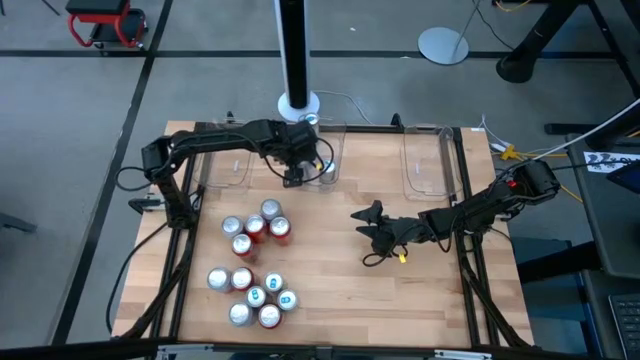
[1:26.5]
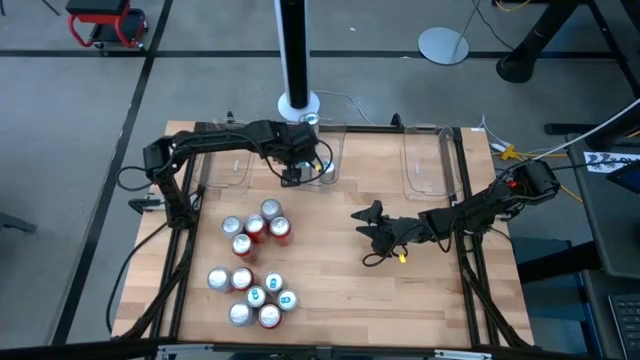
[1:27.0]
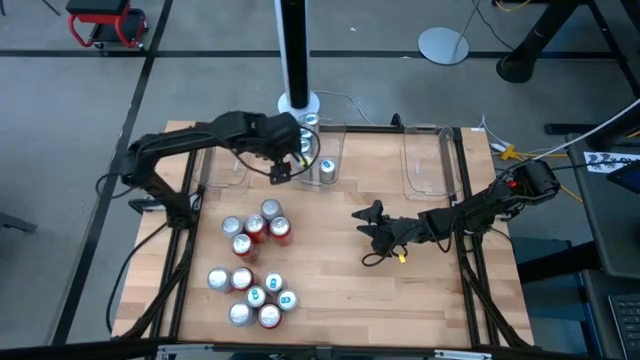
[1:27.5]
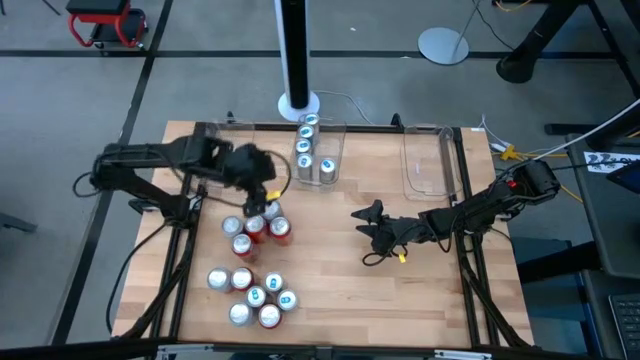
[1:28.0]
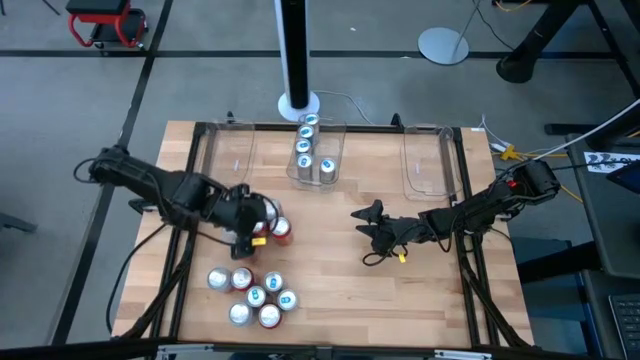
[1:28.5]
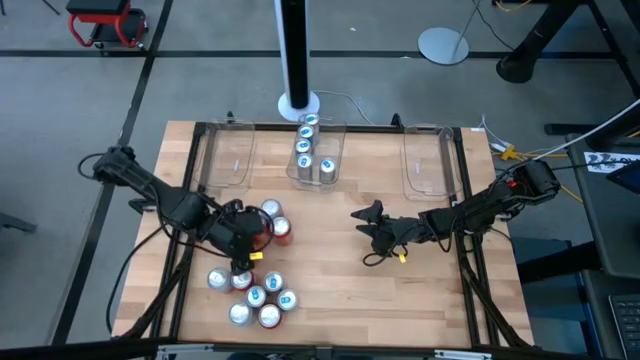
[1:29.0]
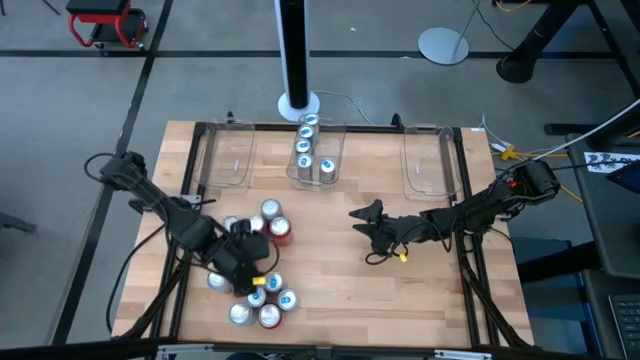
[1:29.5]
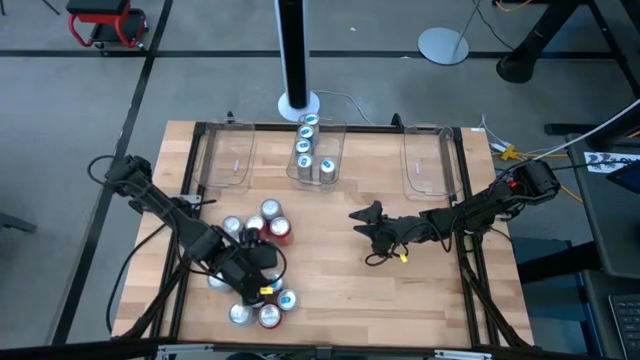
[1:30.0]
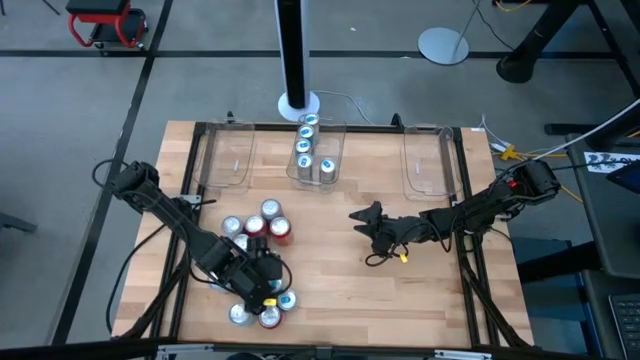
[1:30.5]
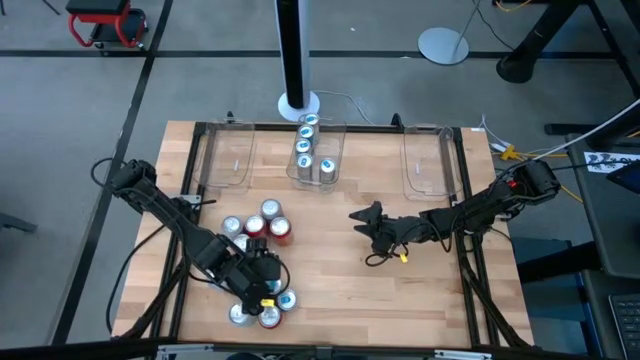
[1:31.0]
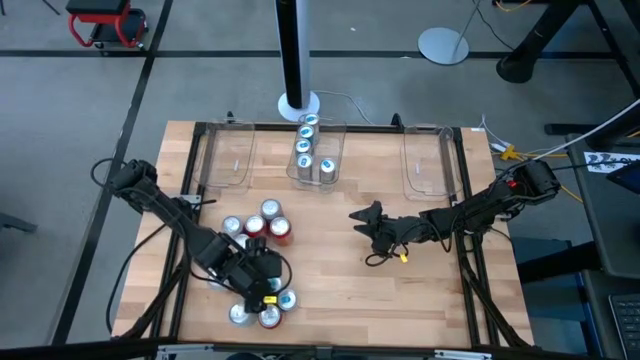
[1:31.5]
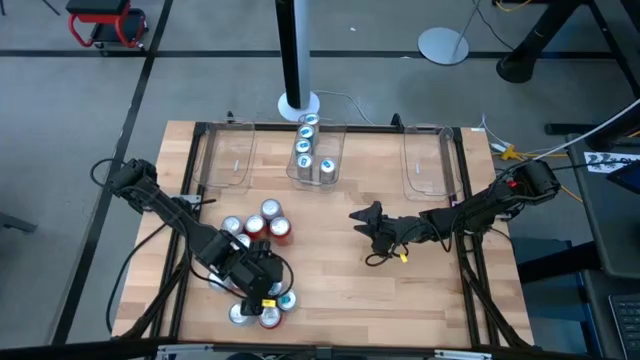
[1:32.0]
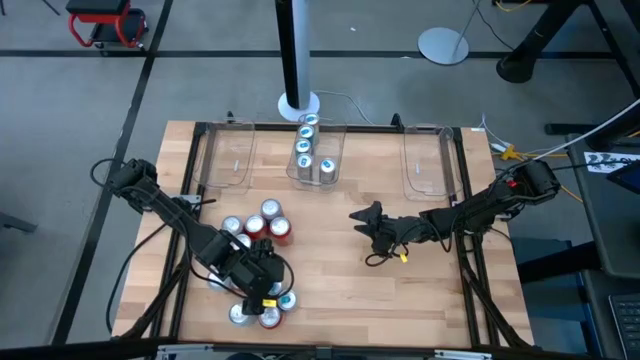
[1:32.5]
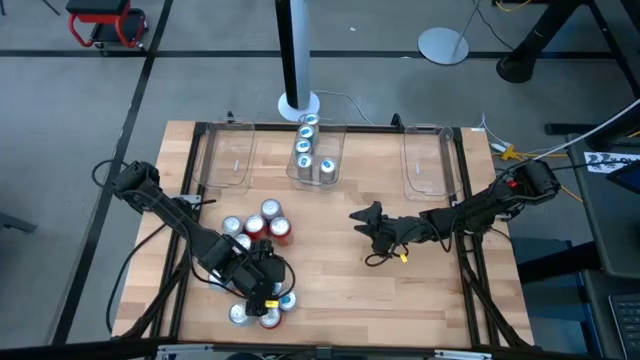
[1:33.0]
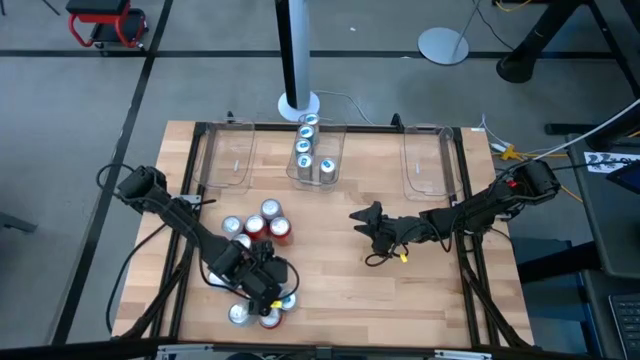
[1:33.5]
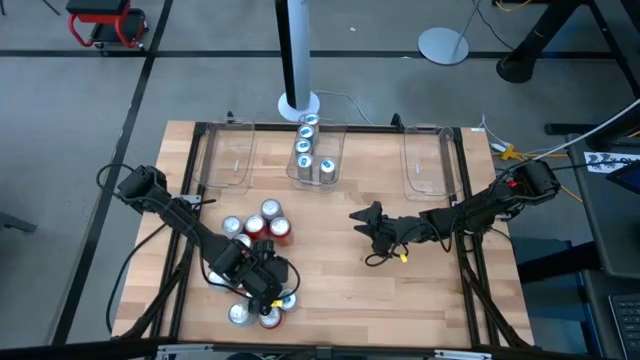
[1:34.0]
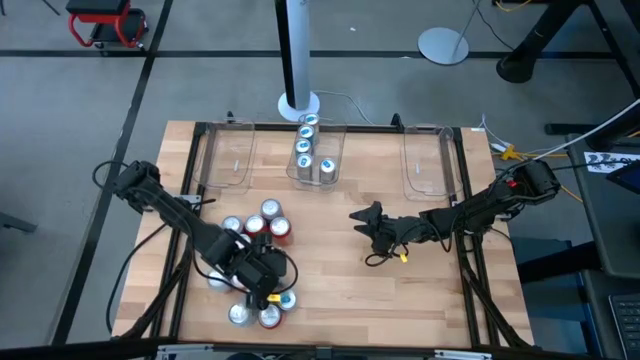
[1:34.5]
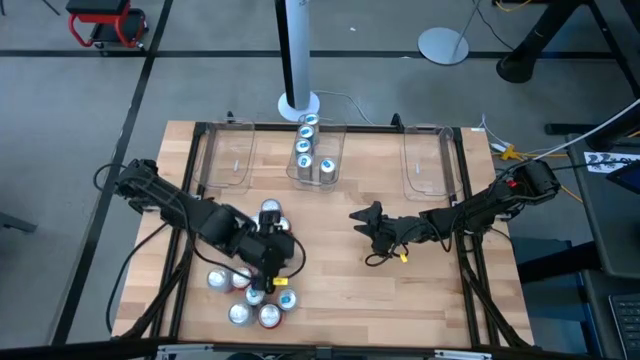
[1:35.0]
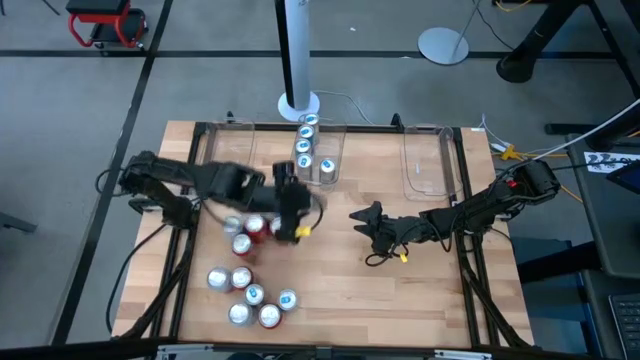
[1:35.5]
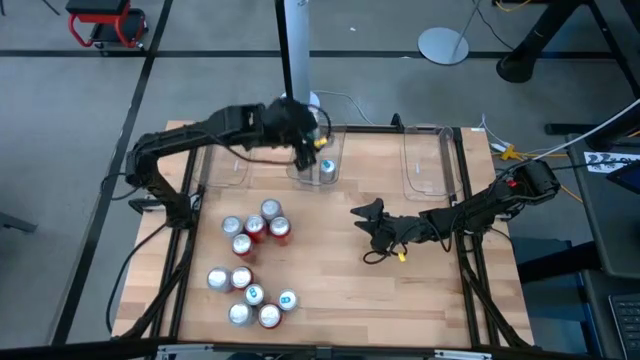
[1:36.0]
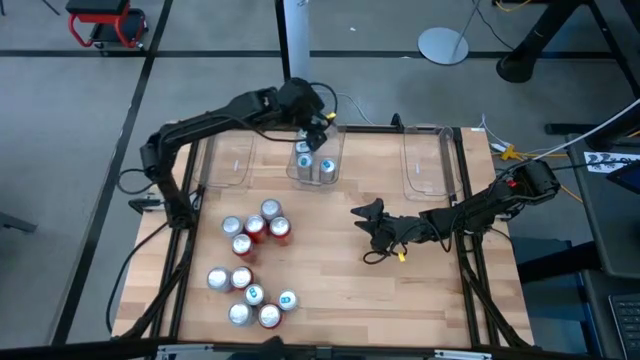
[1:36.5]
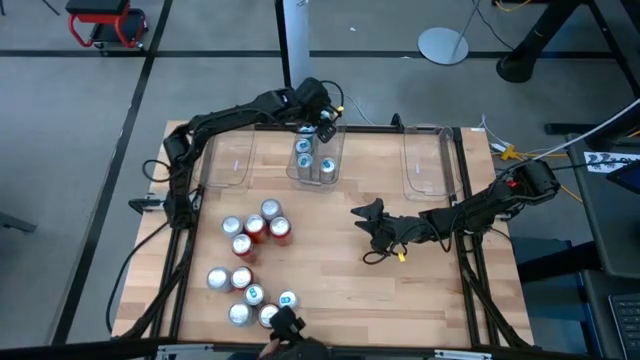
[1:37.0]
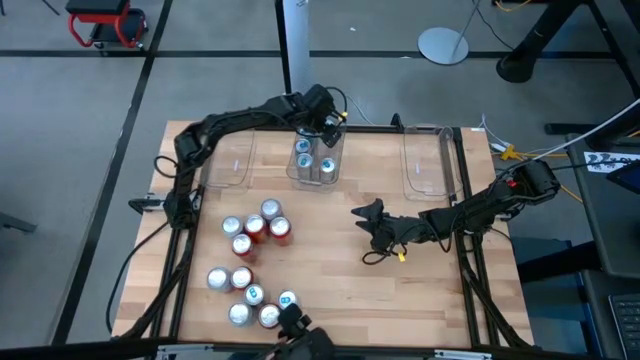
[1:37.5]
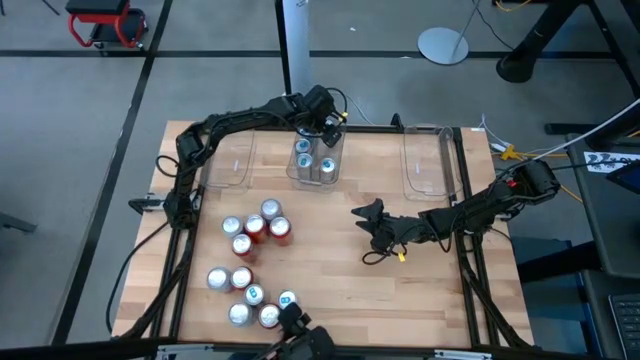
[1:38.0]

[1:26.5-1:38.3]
Task: Sort soda cans
Put the blue soda can into the middle transparent bin

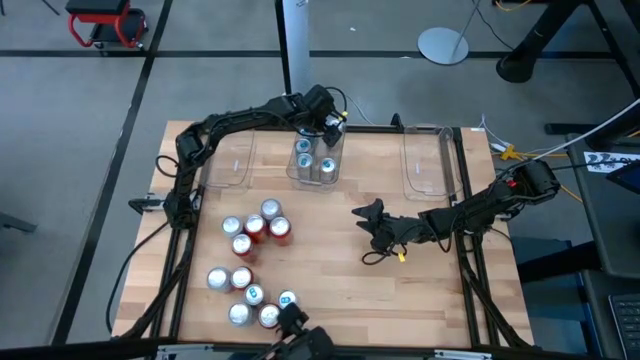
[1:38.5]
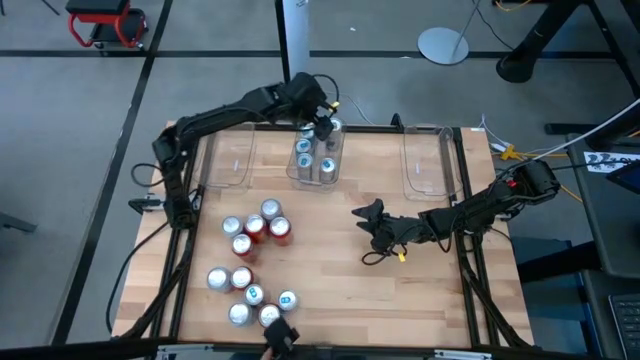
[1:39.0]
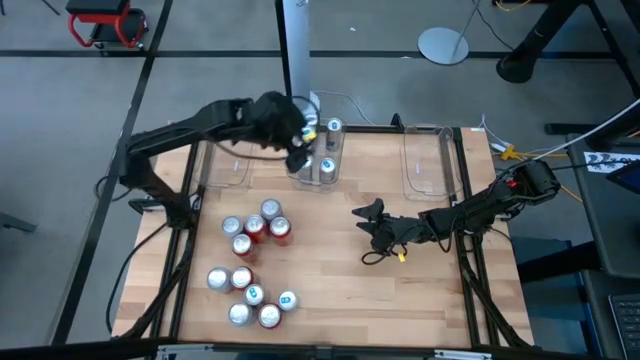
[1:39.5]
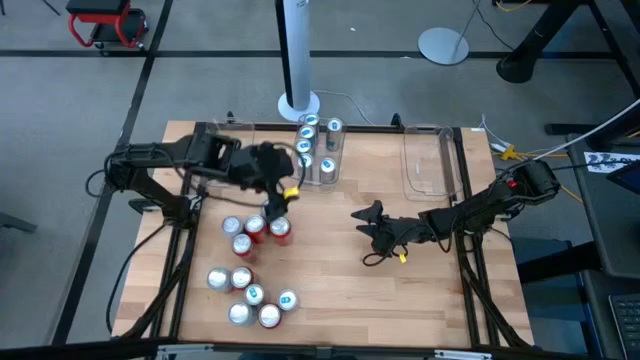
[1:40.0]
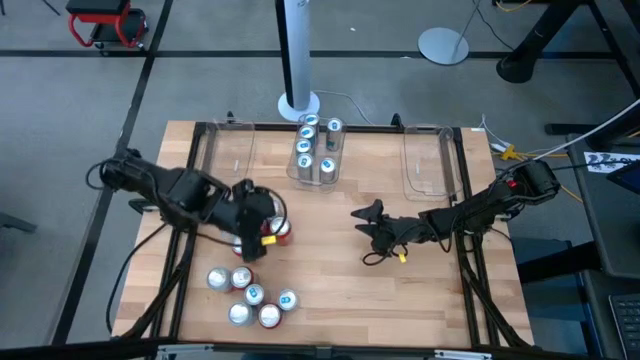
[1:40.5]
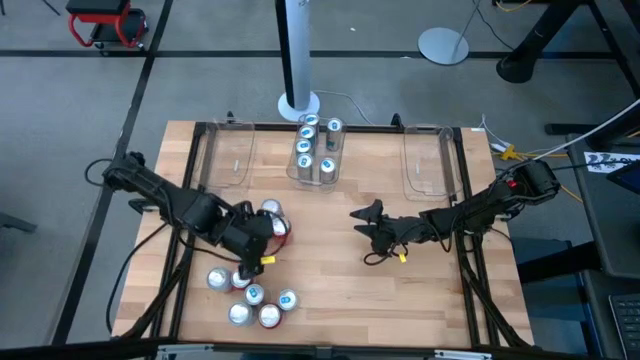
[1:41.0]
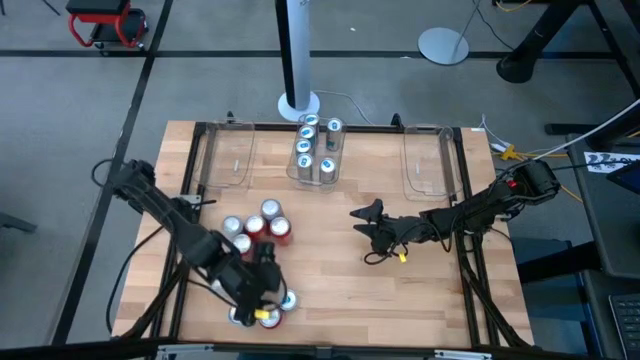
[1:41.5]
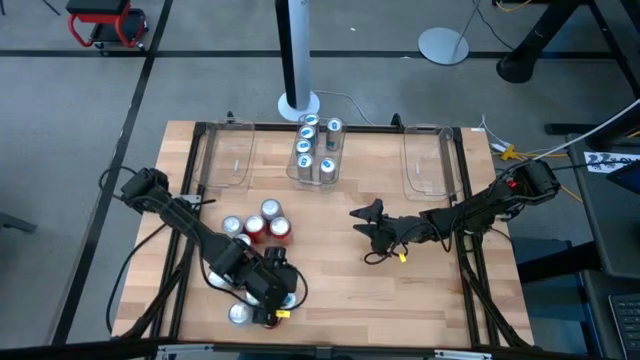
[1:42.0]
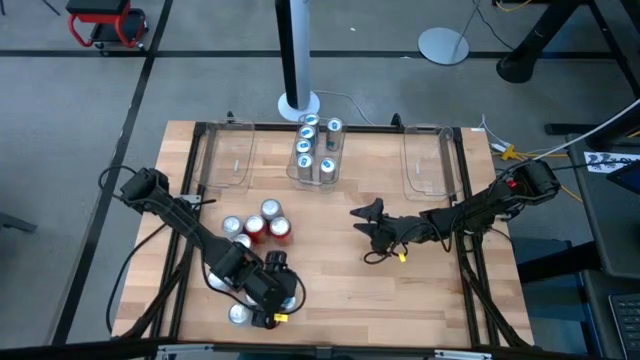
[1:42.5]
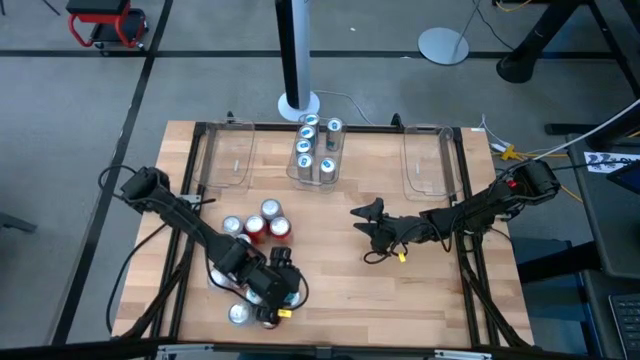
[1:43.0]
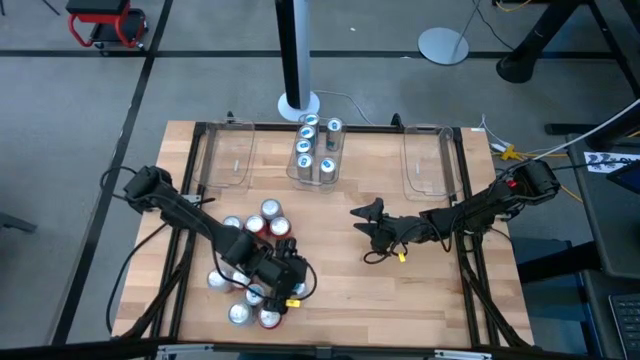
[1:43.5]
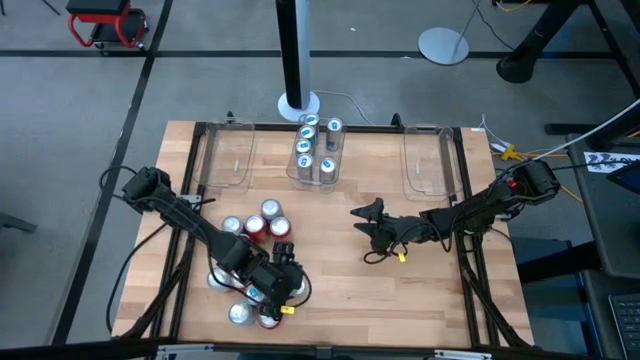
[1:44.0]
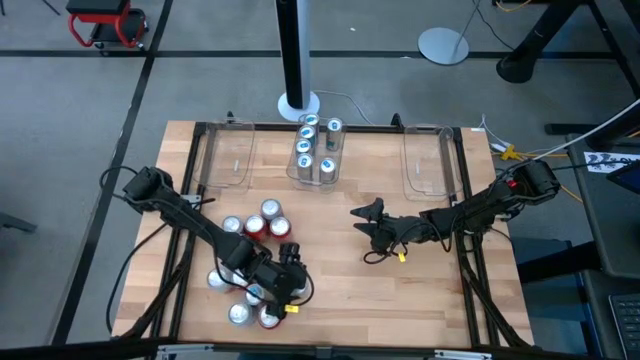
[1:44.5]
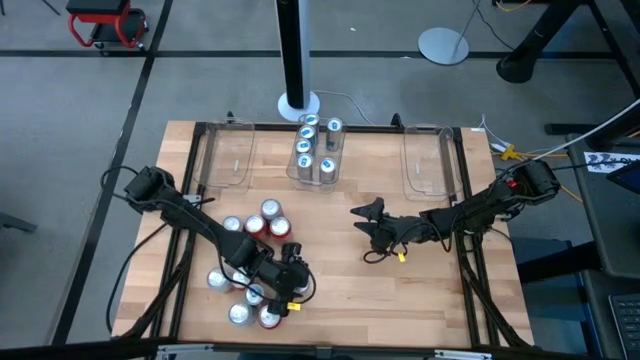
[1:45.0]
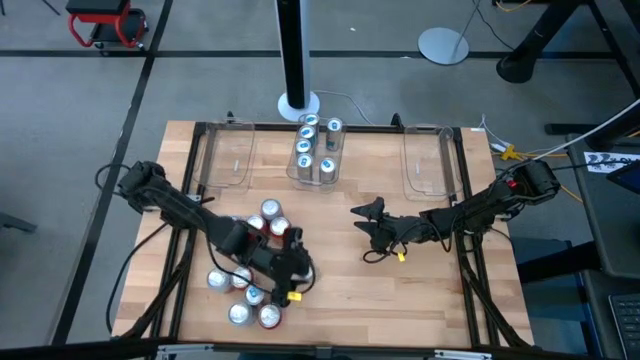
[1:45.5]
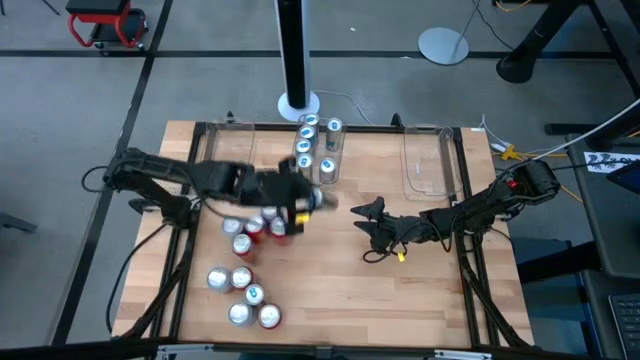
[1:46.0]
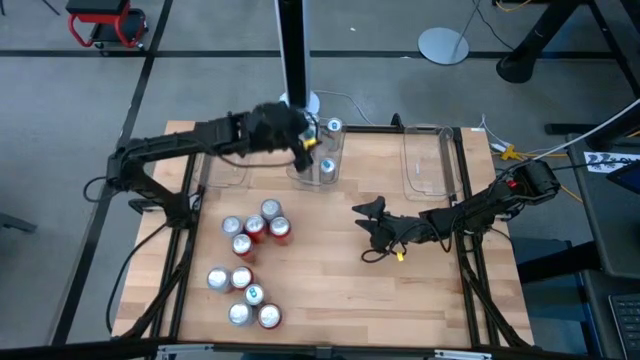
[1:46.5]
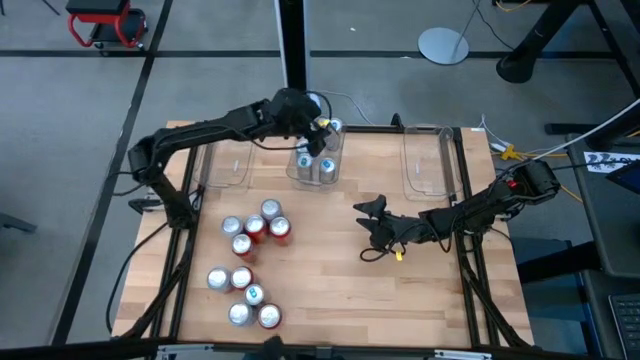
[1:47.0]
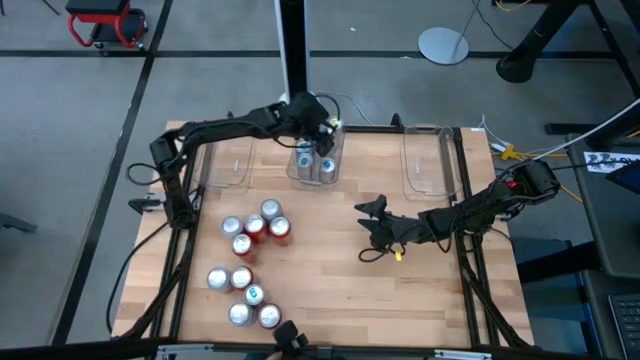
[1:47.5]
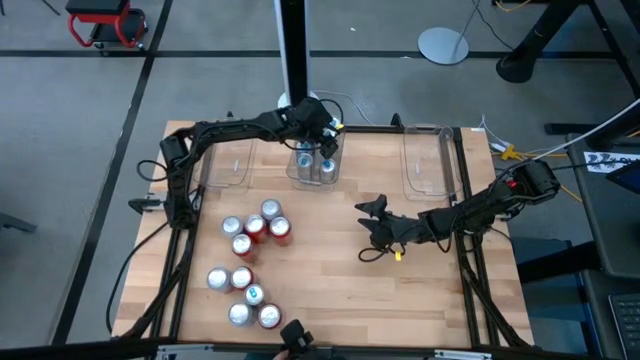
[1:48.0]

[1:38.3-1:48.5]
Put the blue soda can into the middle transparent bin
